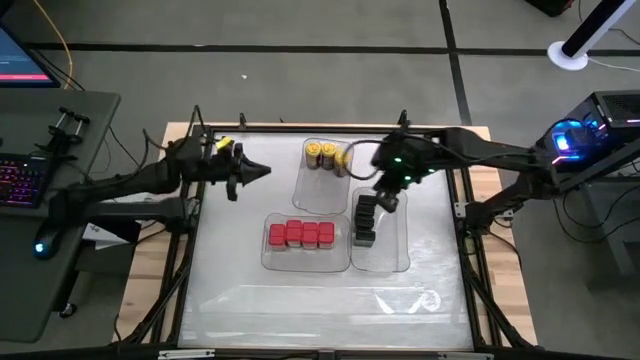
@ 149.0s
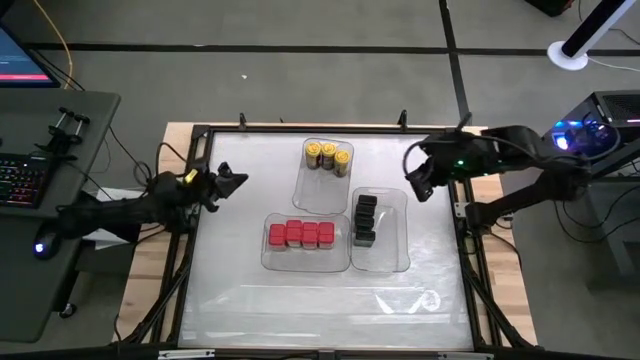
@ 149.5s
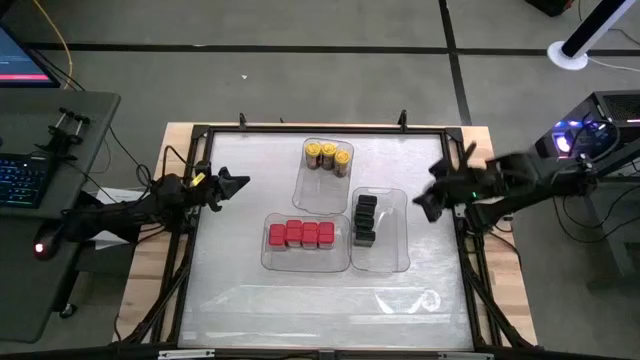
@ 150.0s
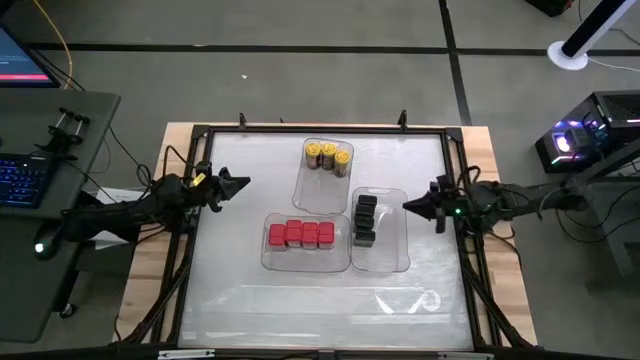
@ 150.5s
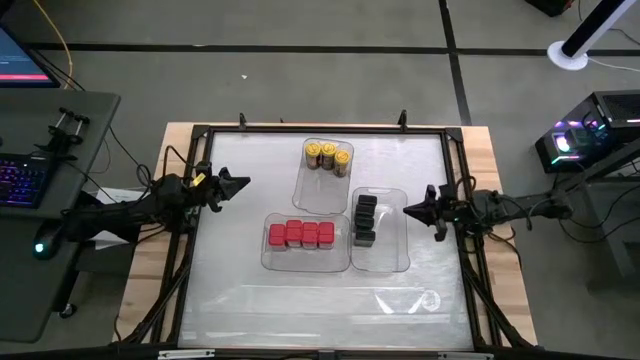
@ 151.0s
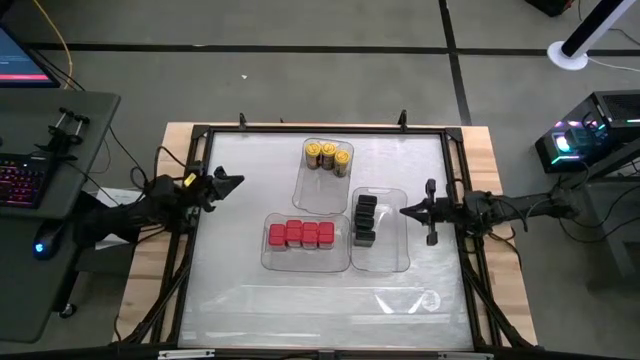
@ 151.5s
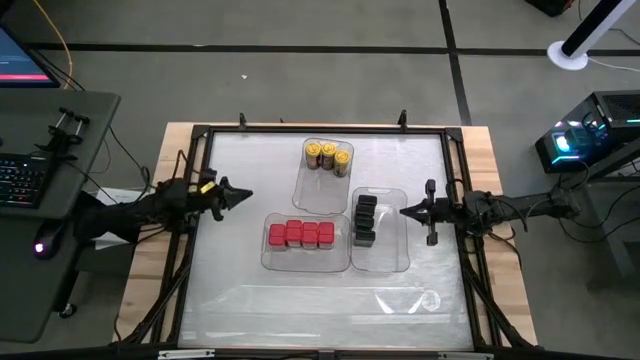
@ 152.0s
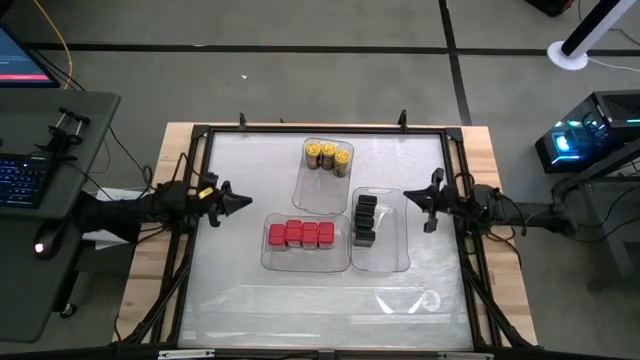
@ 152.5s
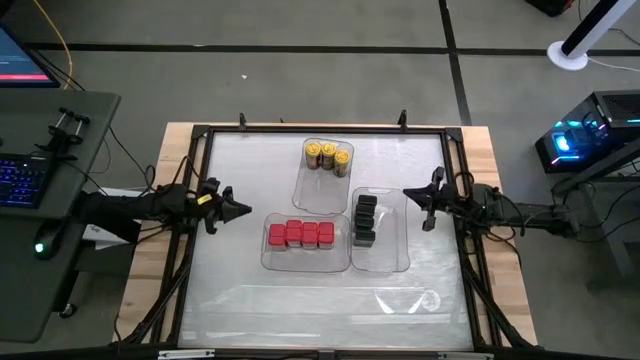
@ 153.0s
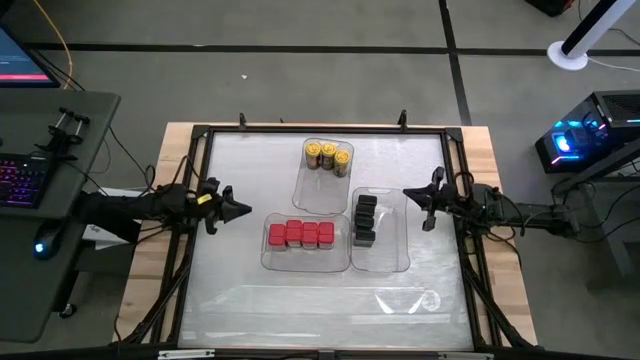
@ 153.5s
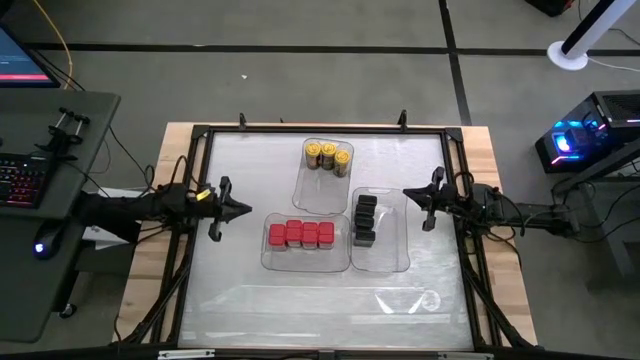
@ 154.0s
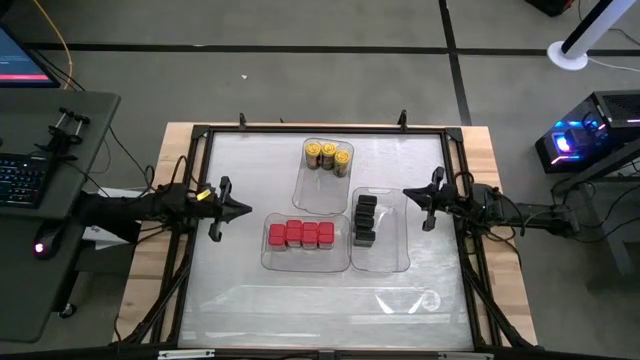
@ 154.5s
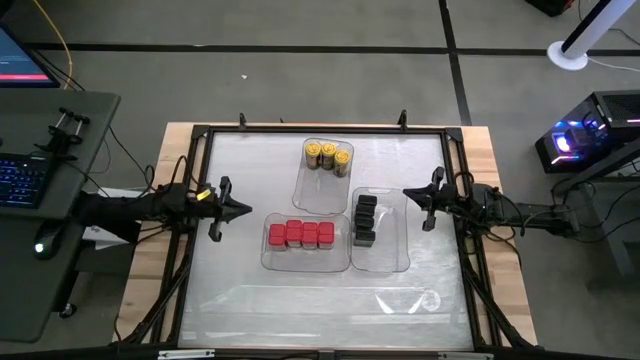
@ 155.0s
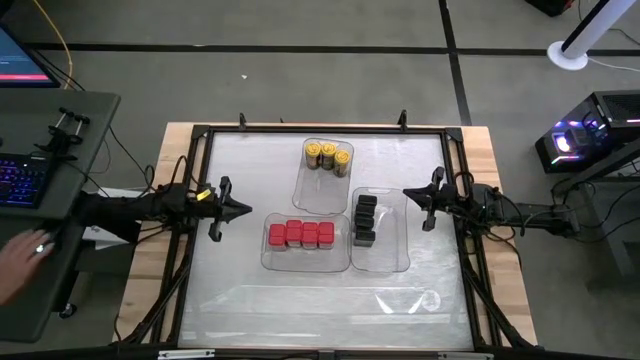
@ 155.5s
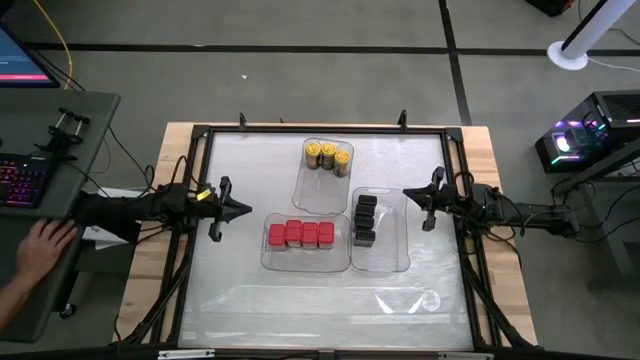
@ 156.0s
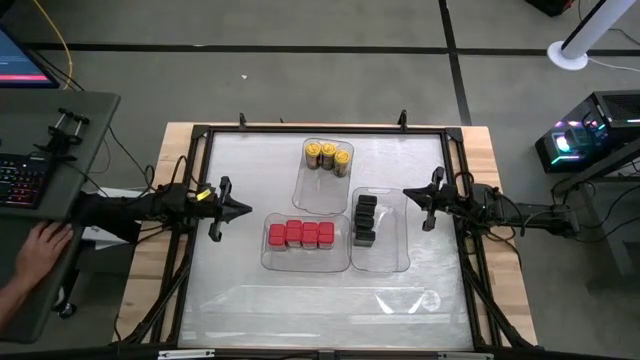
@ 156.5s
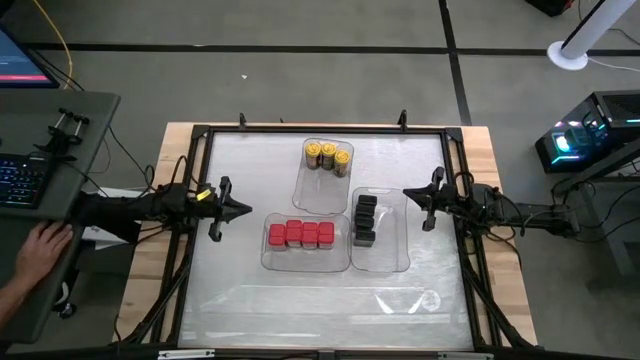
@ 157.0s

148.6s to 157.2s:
Task: Sort spices by type
Return to Home Position

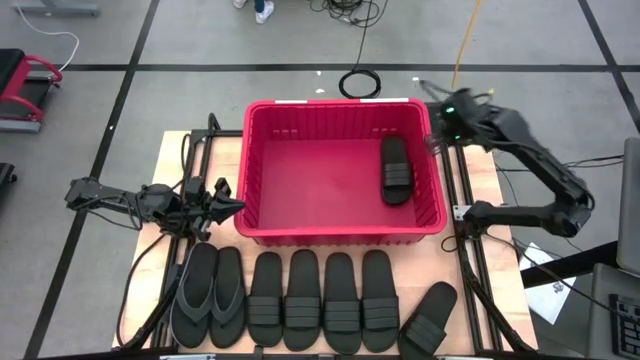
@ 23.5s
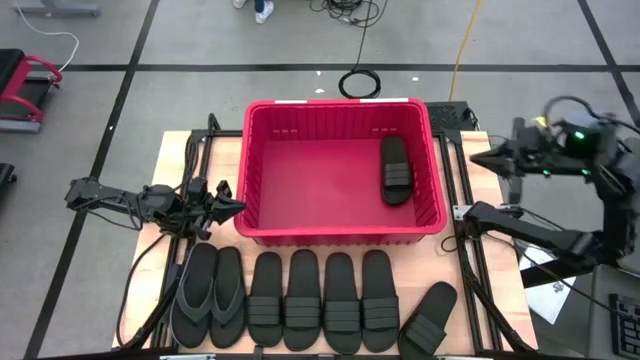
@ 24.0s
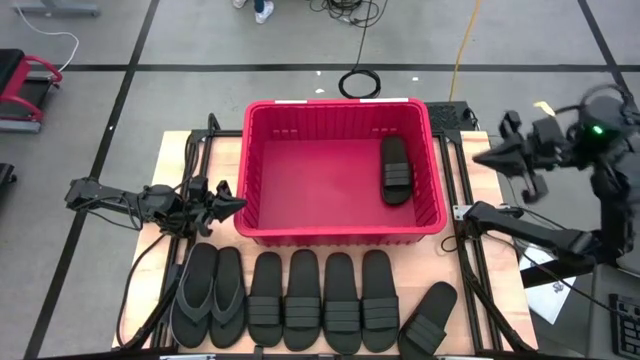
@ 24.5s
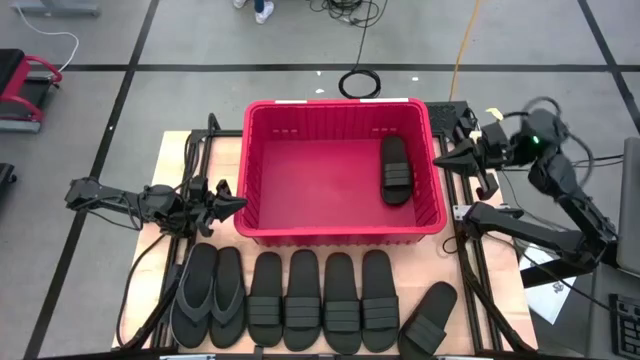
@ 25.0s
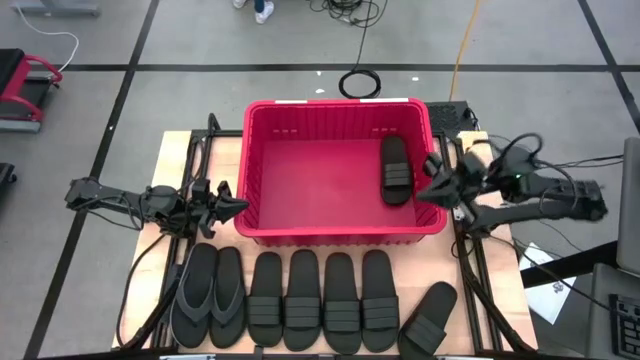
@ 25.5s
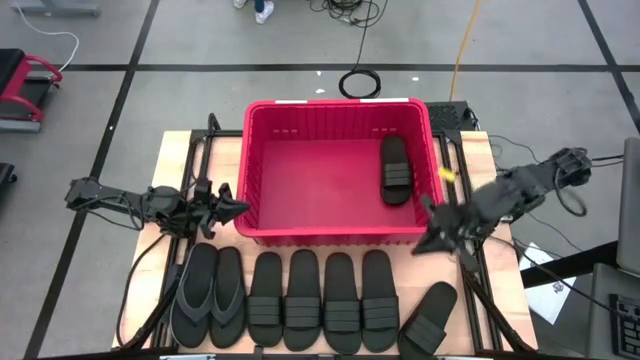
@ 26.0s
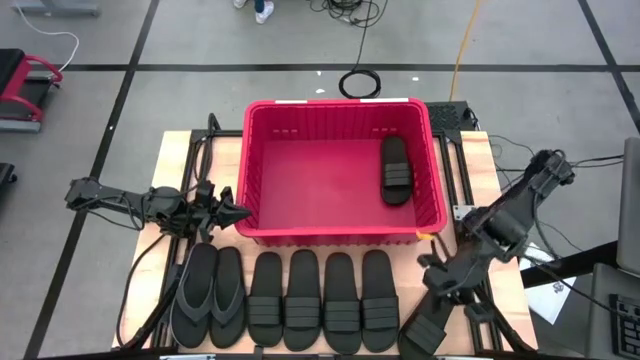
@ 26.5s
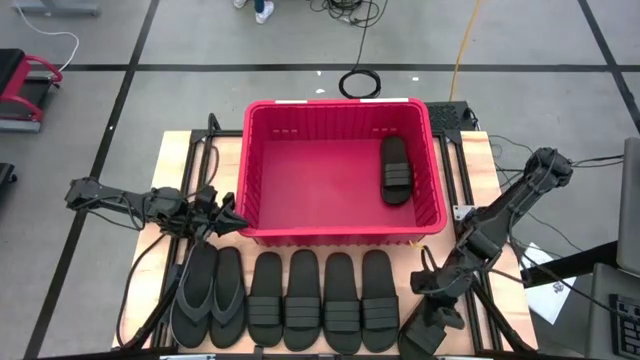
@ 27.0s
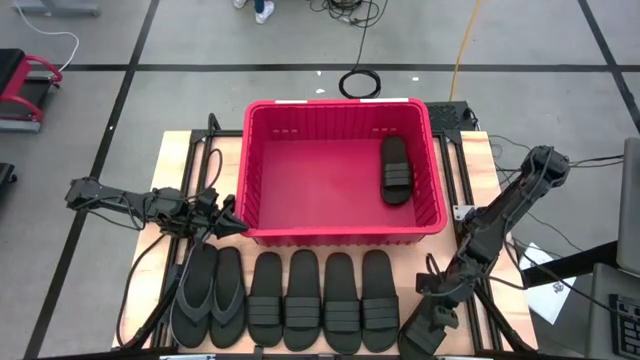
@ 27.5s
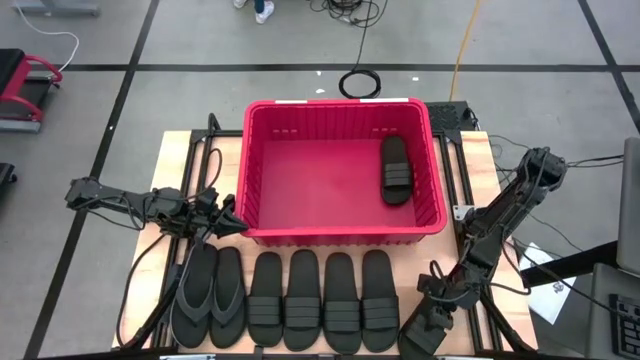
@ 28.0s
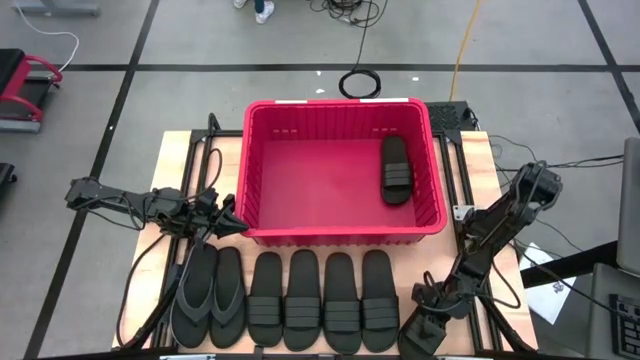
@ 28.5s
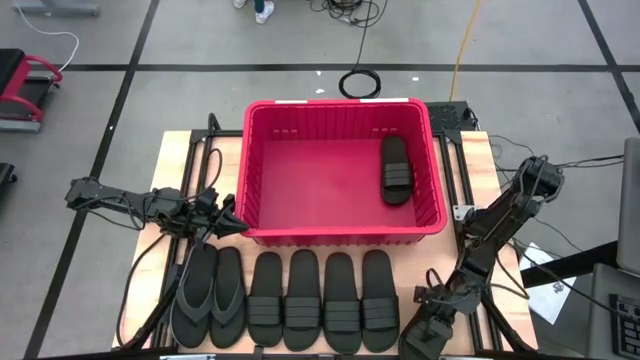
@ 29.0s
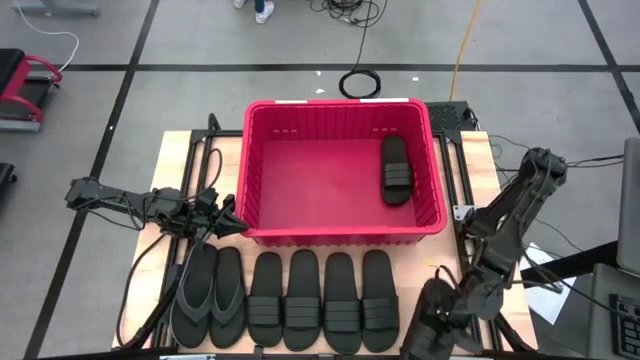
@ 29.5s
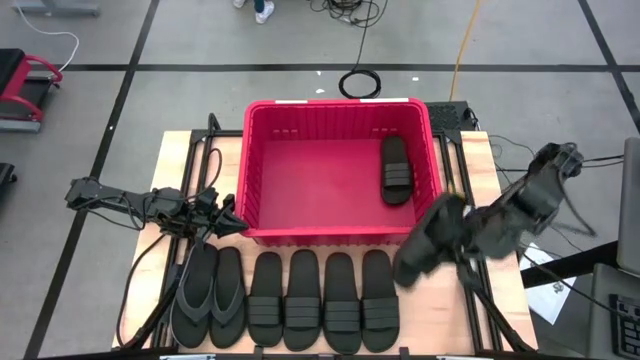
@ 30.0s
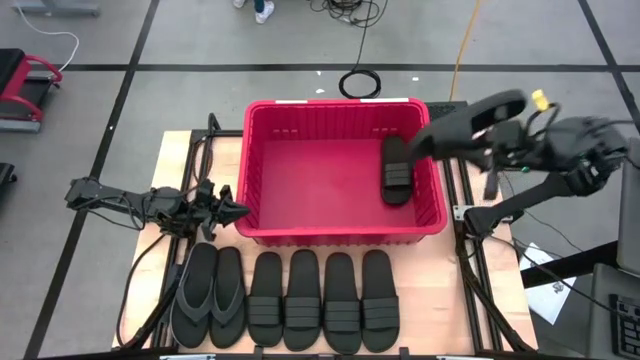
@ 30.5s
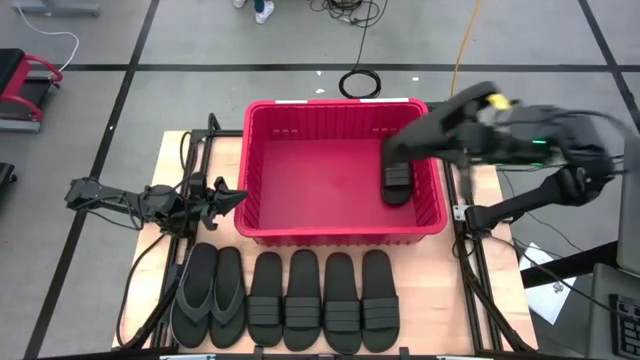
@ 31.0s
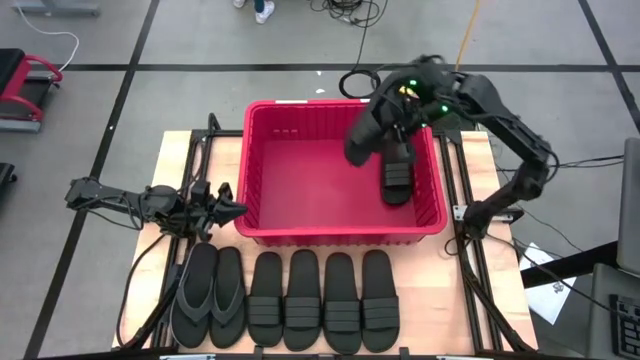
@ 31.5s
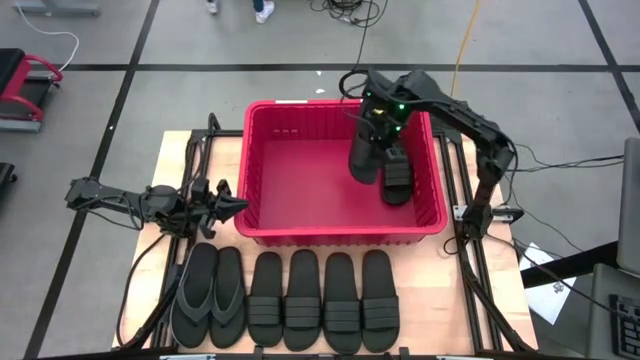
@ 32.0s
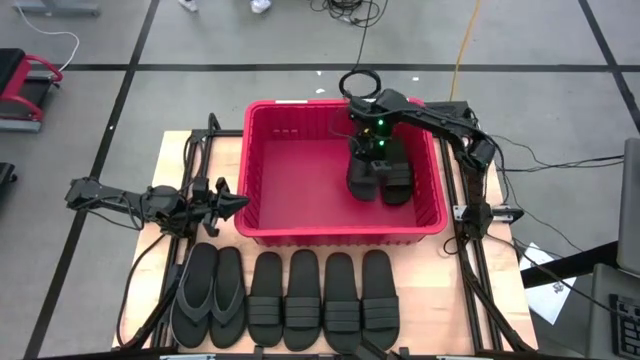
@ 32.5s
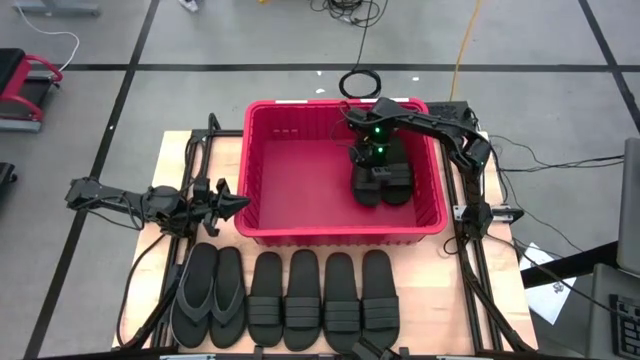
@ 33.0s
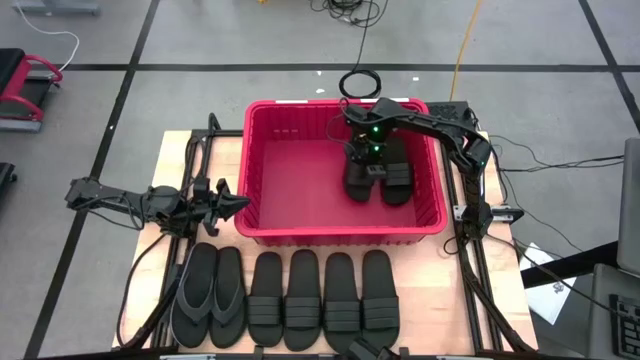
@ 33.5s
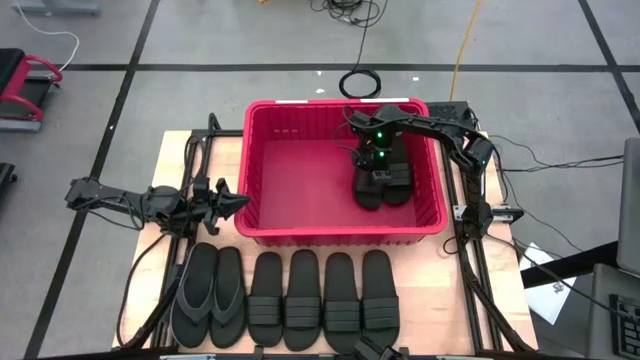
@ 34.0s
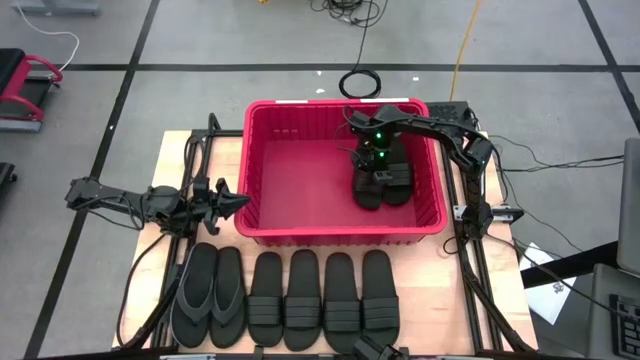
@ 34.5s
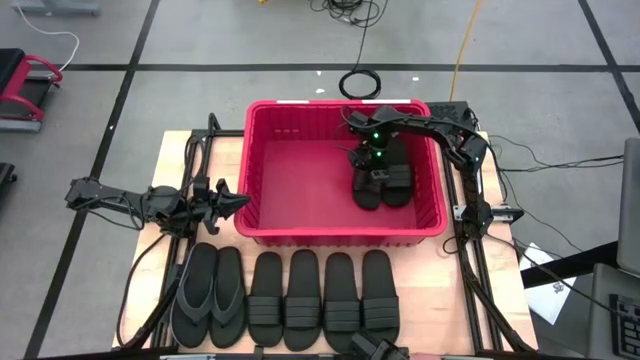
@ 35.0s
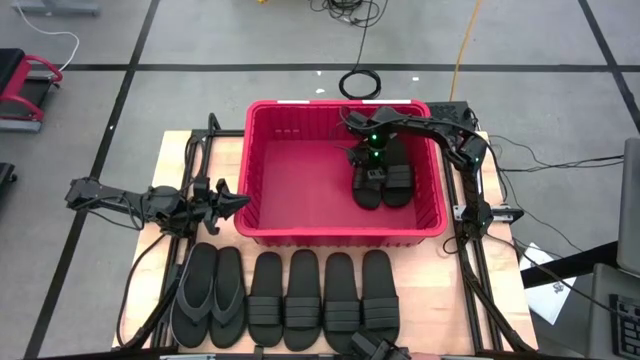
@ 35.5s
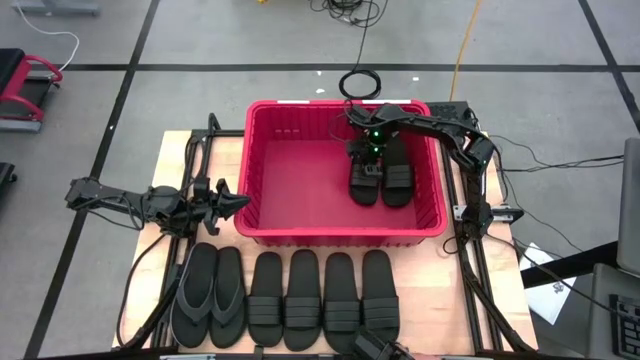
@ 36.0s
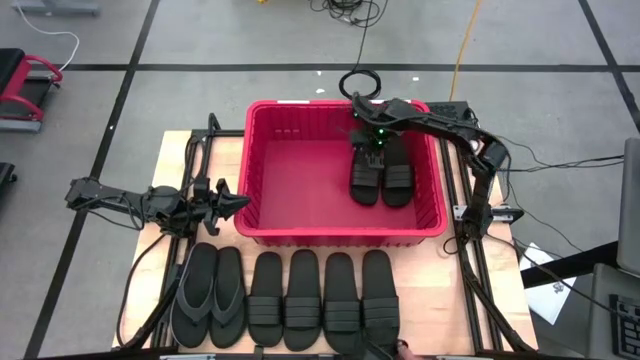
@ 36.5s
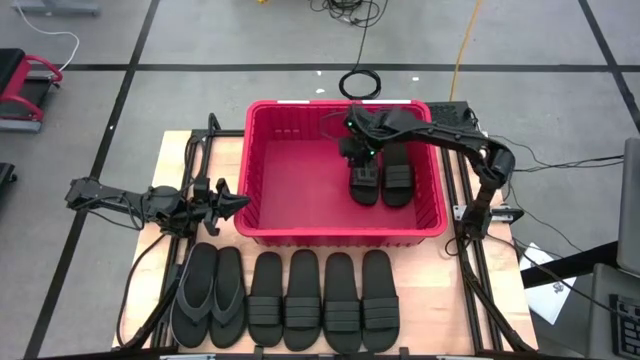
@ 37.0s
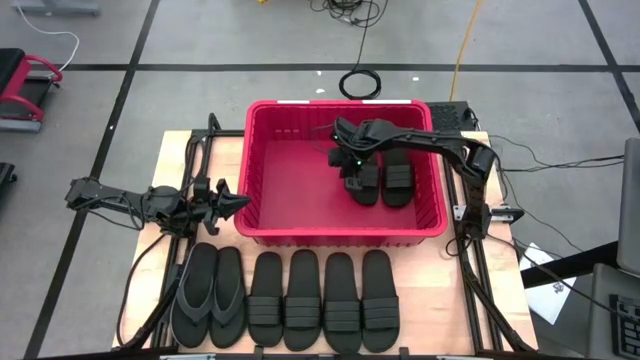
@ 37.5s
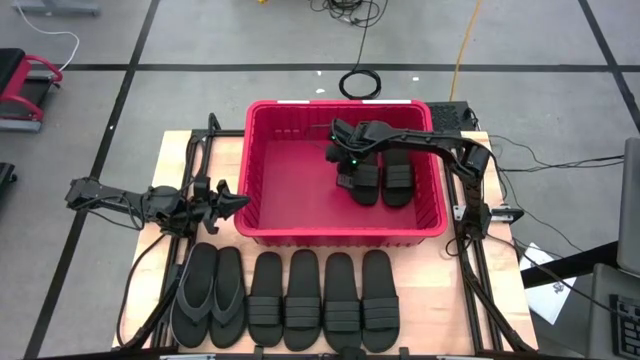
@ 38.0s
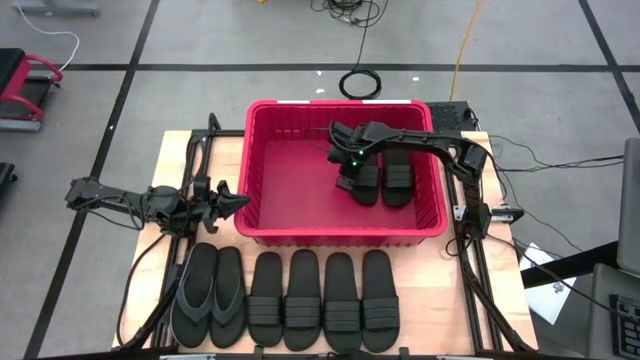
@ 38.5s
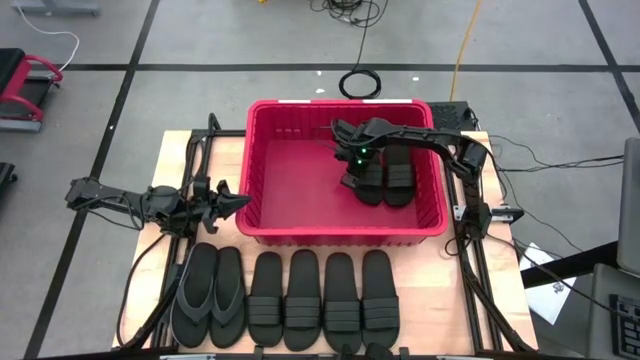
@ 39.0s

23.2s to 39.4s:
Task: Pick and place slides into bin
Put the black slide into the red bin
